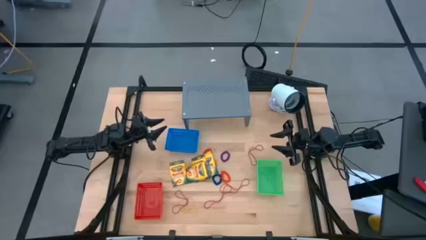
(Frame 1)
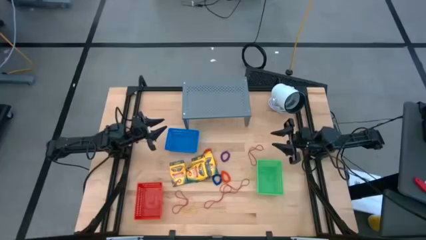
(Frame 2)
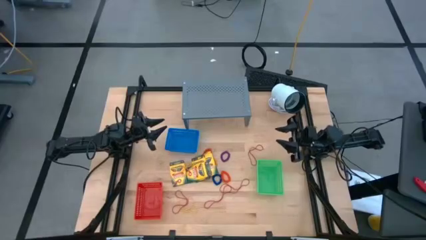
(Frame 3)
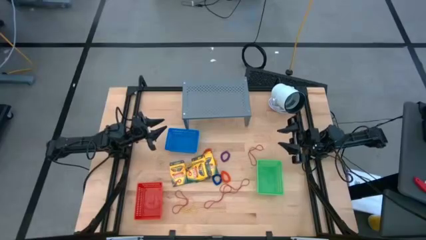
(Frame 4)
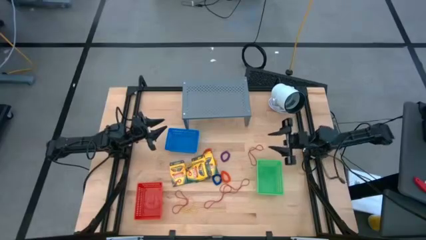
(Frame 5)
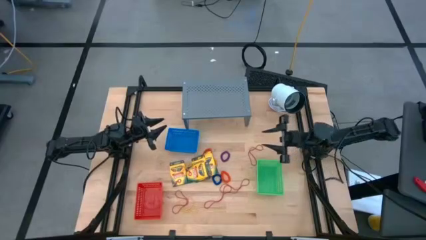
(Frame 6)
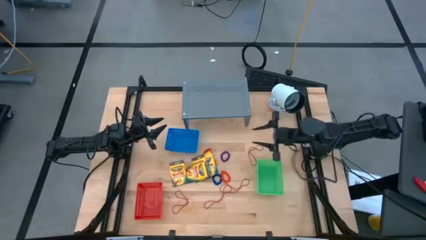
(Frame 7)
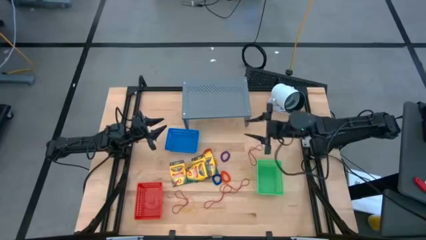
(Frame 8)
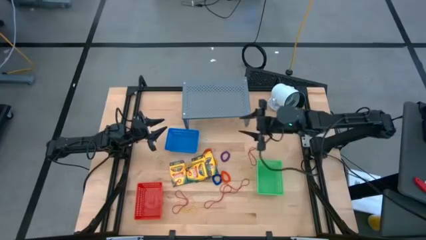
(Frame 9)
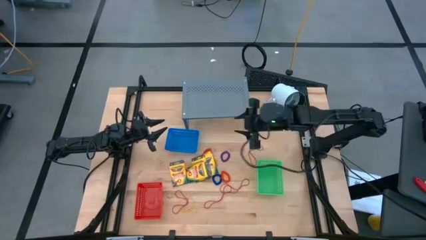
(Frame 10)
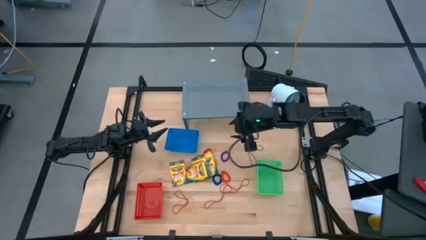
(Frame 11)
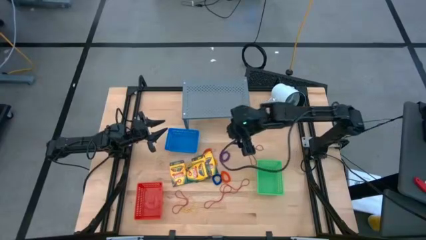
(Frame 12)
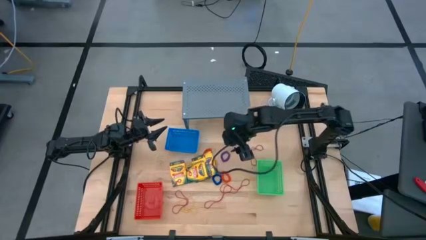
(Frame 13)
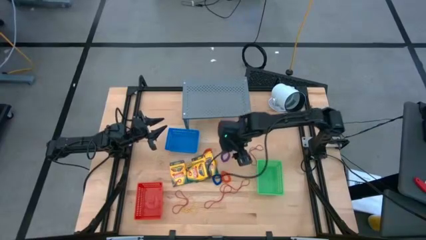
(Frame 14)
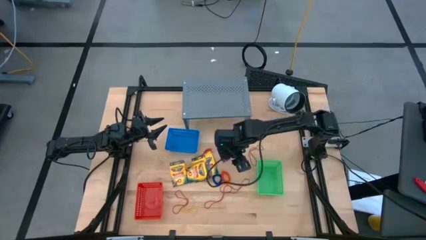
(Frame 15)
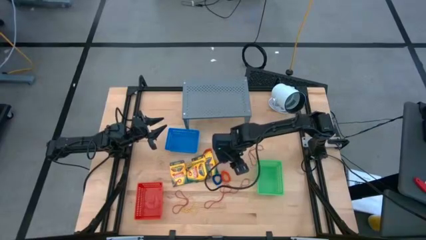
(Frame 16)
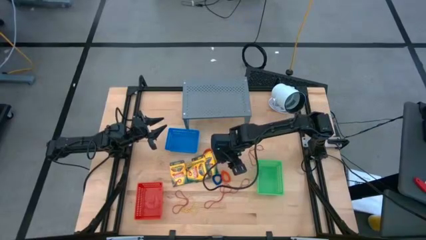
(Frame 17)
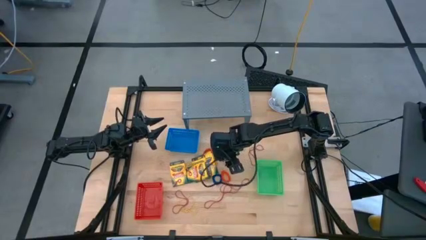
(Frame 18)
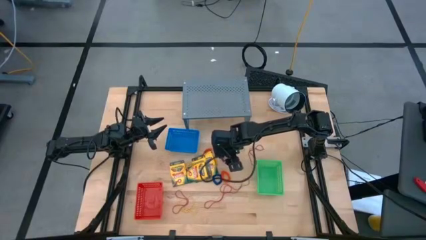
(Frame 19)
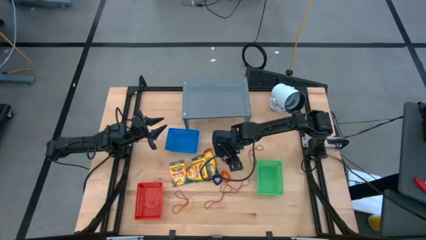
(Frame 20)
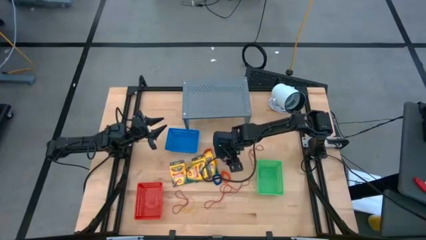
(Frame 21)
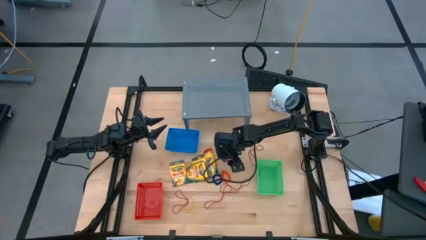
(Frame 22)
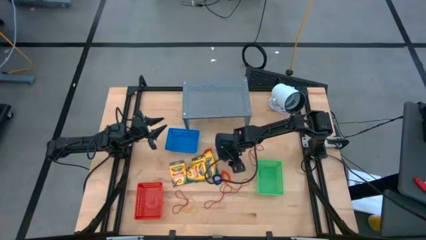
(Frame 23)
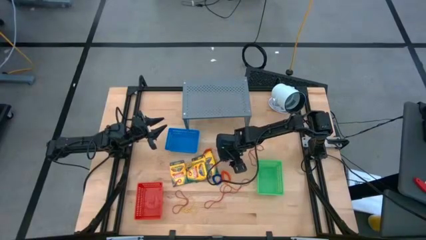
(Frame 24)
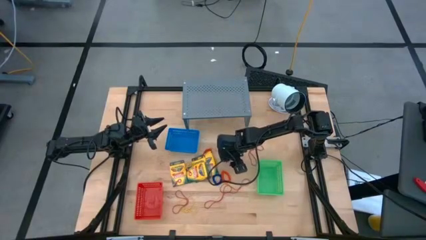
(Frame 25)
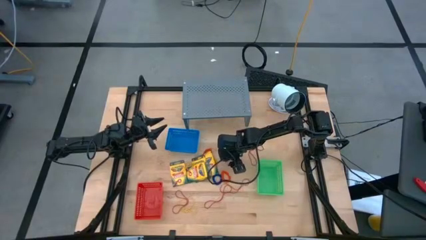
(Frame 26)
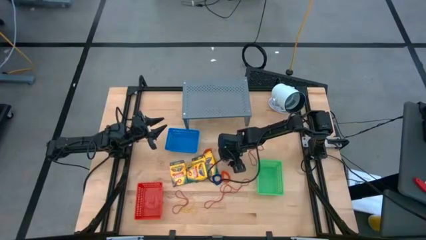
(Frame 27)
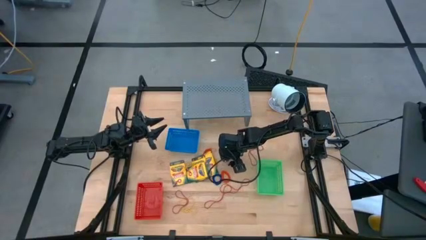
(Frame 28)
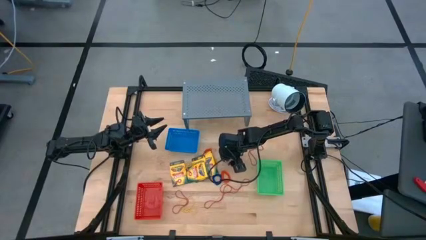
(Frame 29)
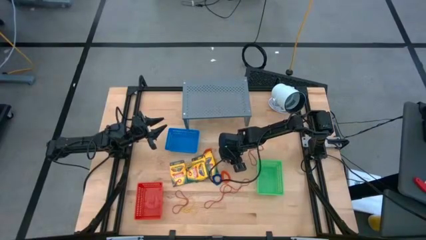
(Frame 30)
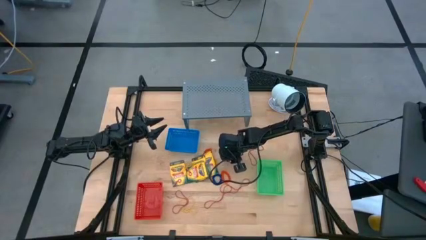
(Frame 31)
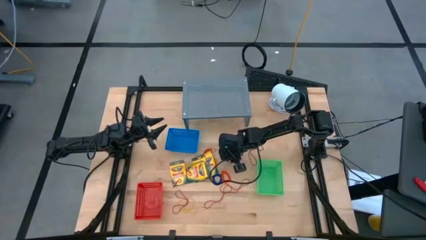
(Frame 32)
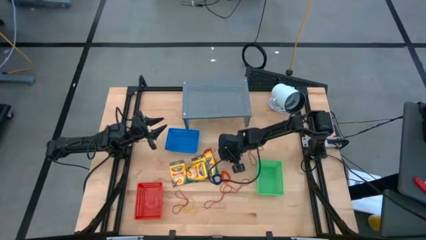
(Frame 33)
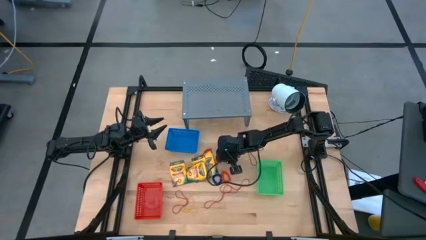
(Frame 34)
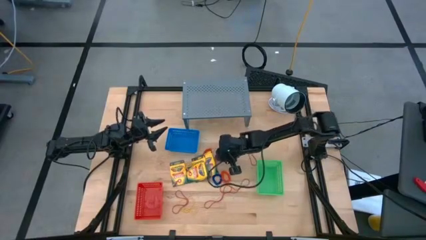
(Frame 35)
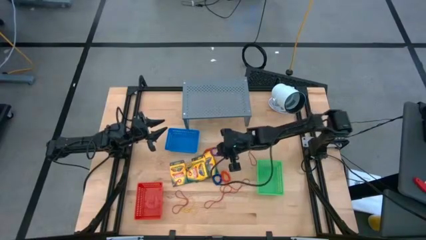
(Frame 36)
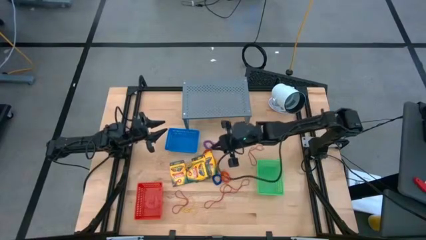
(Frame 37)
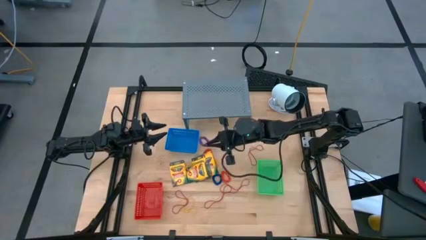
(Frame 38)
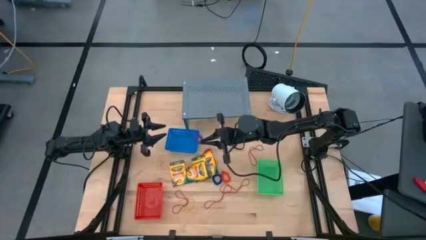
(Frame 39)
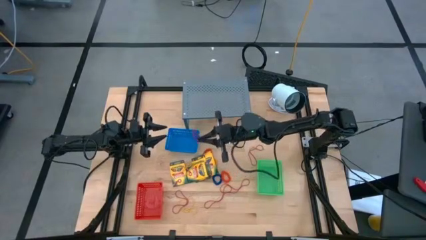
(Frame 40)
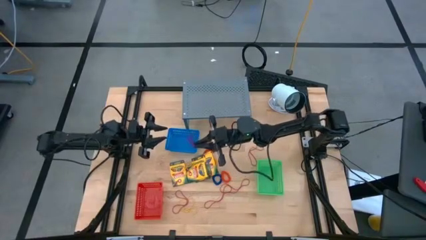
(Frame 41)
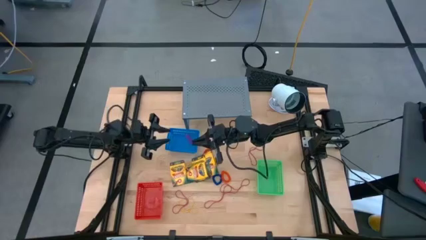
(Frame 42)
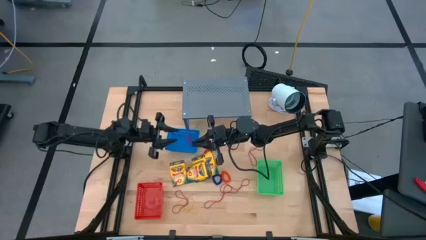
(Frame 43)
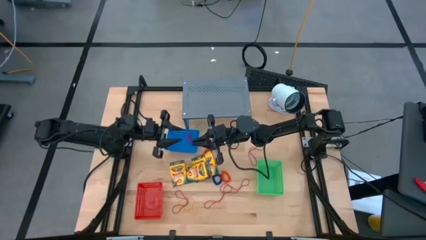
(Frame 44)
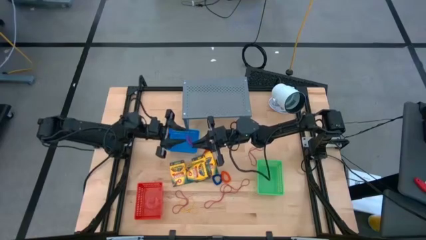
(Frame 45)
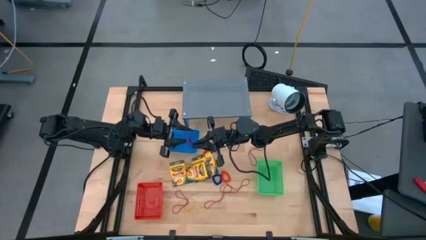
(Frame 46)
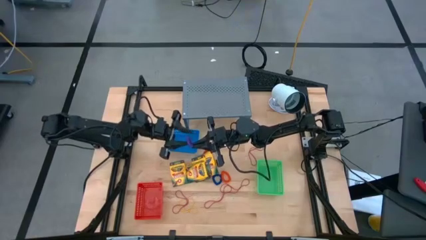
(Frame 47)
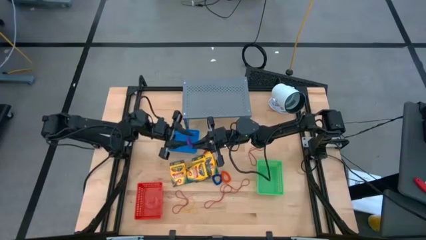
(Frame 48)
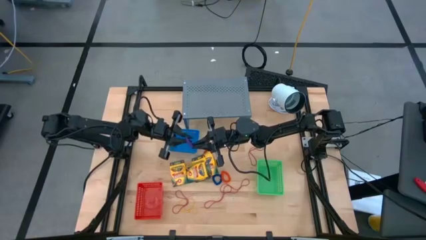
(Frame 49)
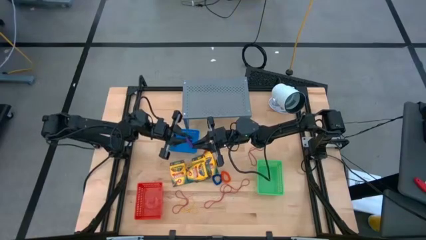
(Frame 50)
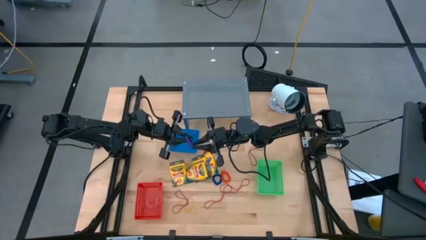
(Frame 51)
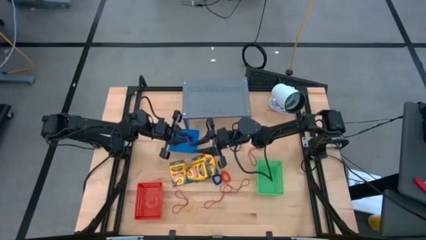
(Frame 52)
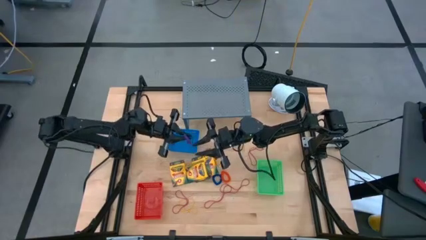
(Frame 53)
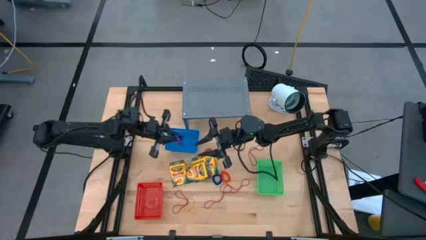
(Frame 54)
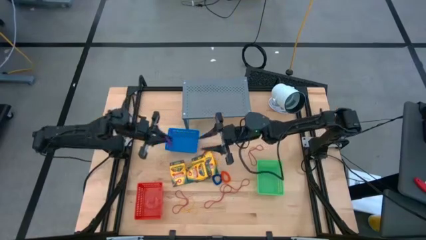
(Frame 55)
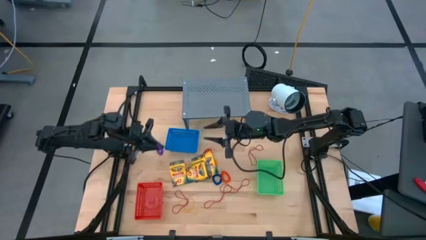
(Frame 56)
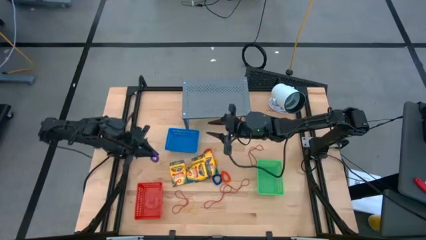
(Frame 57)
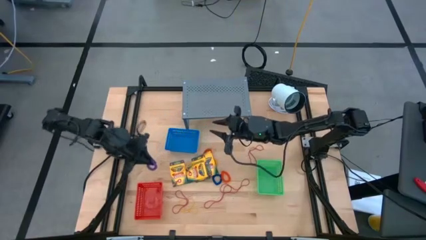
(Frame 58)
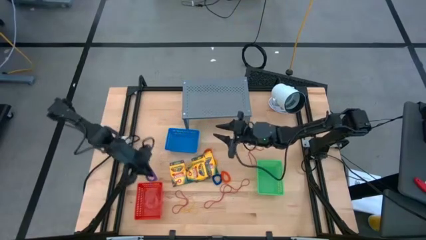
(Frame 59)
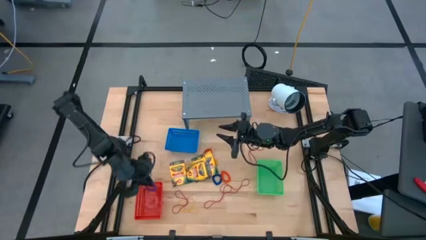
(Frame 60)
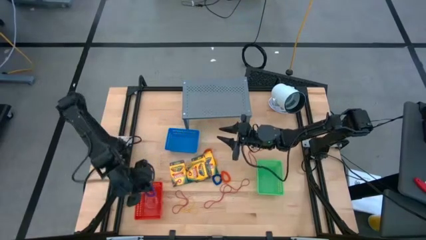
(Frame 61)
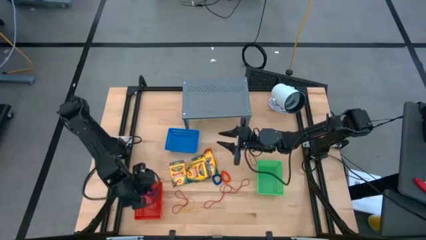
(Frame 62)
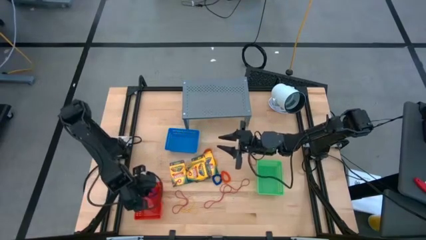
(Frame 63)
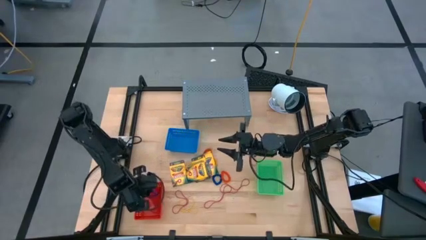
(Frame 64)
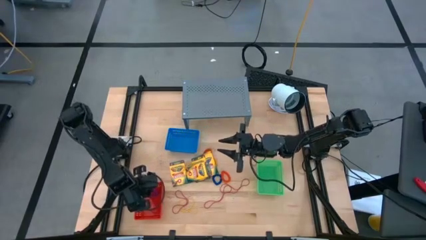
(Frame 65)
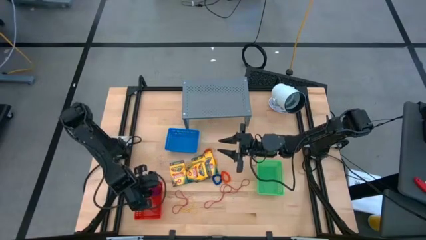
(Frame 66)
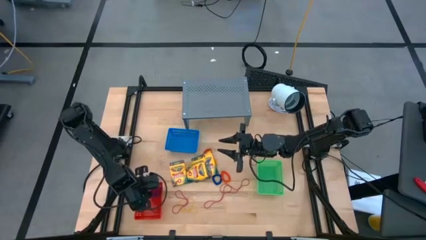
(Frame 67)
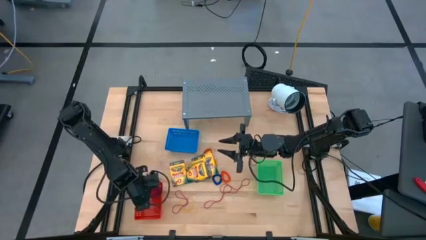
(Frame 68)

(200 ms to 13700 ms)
Task: Pick & Place Office Desk Supplies
Put the purple spiral keychain into the red bin
